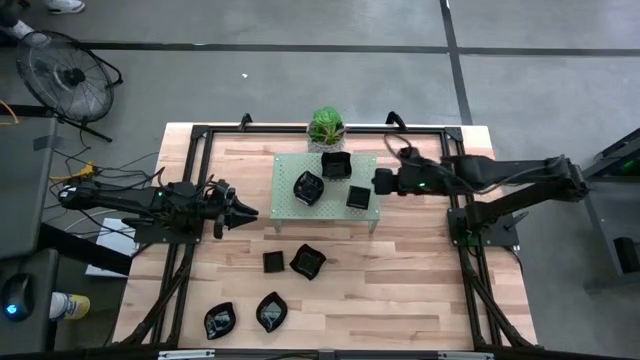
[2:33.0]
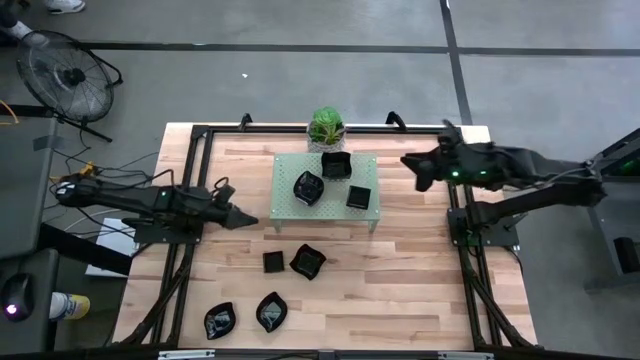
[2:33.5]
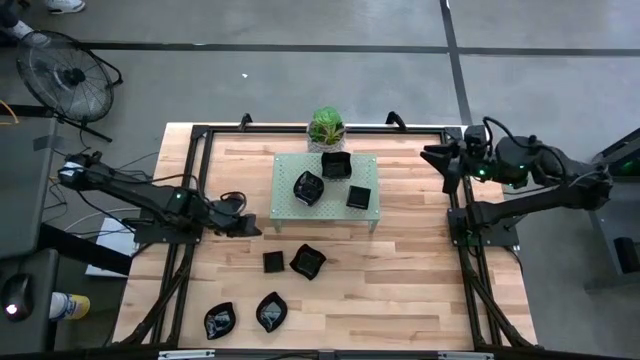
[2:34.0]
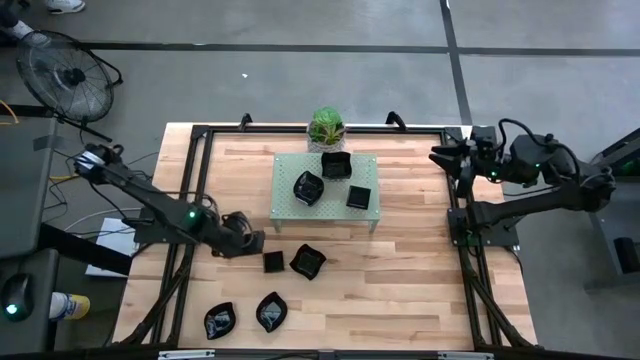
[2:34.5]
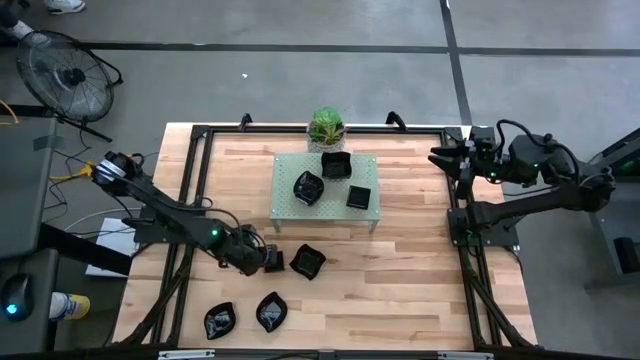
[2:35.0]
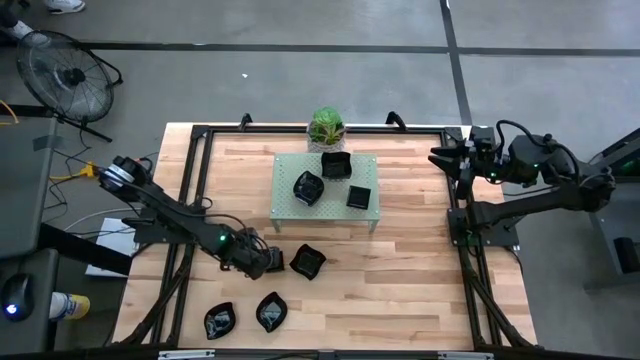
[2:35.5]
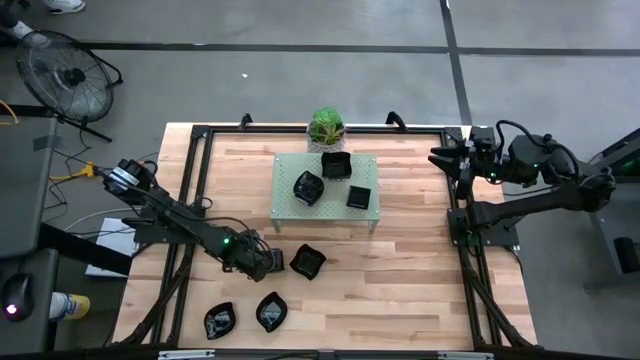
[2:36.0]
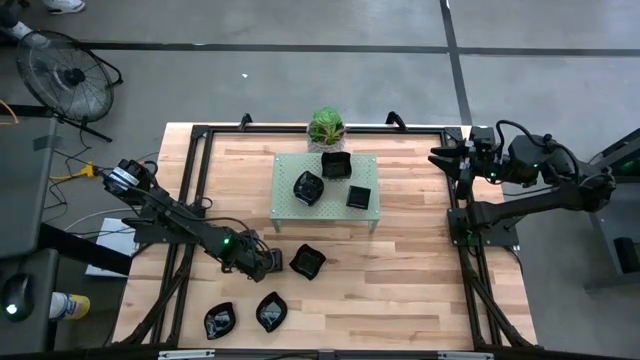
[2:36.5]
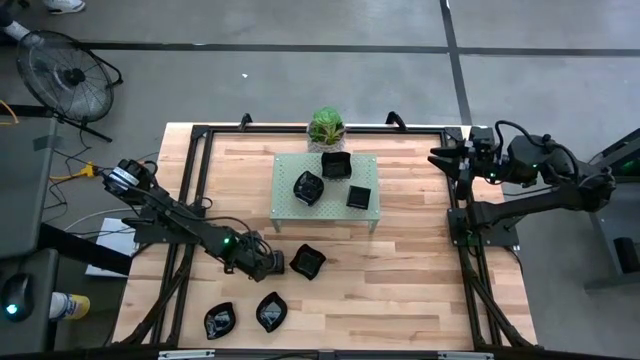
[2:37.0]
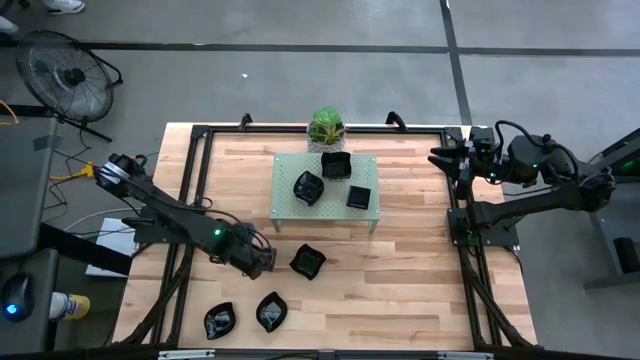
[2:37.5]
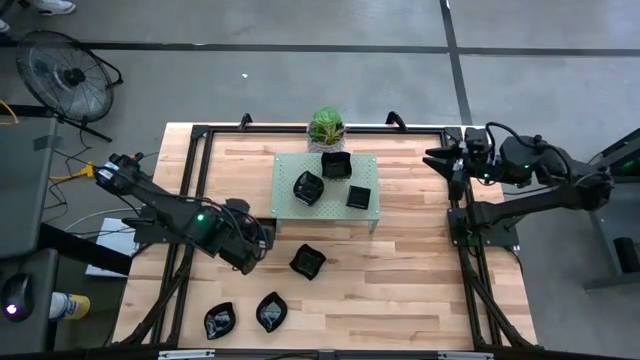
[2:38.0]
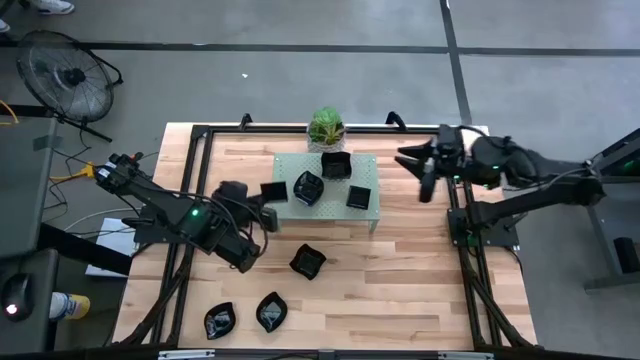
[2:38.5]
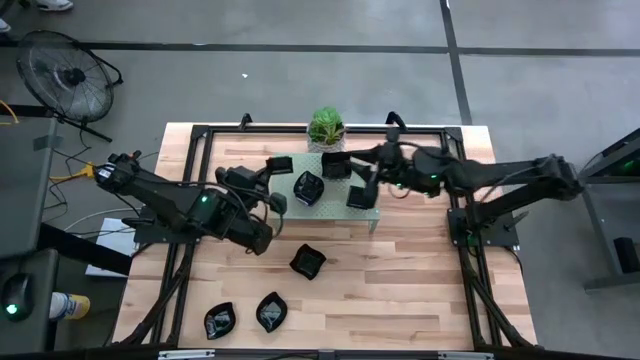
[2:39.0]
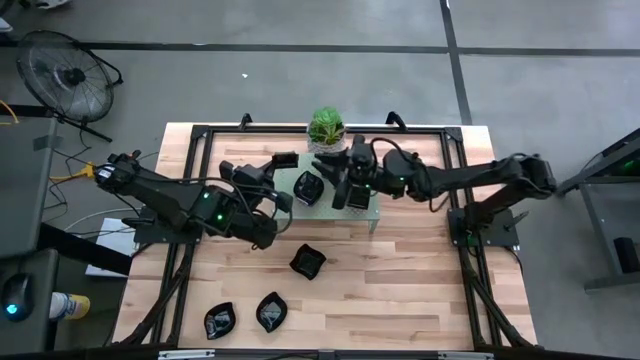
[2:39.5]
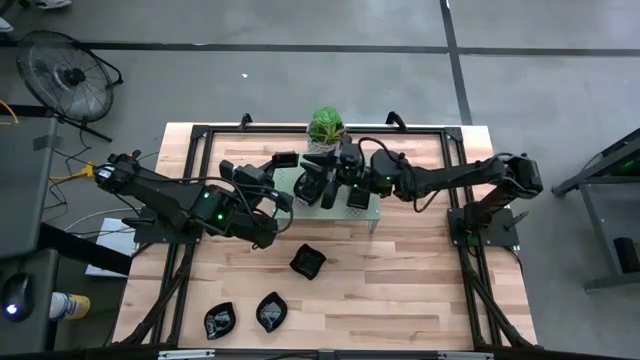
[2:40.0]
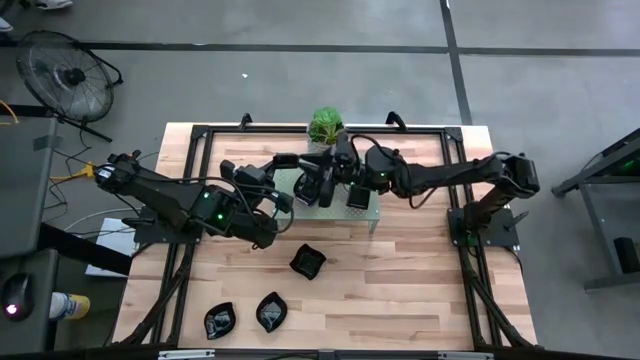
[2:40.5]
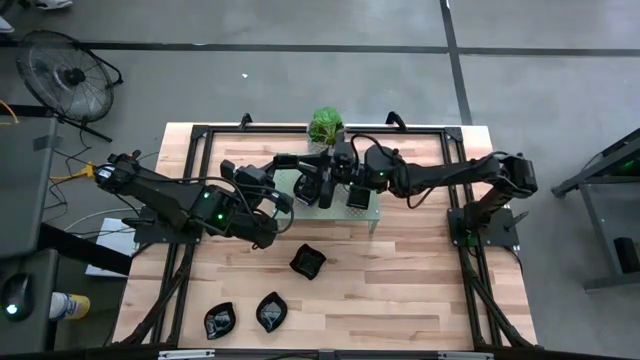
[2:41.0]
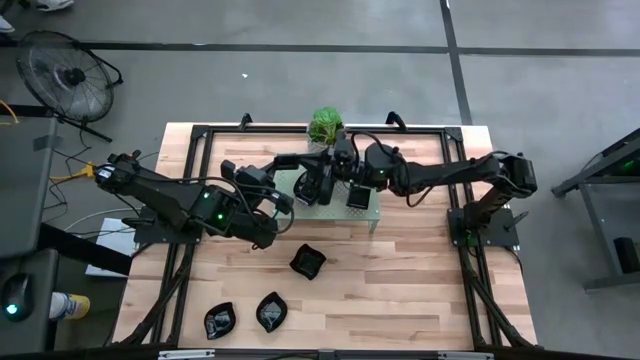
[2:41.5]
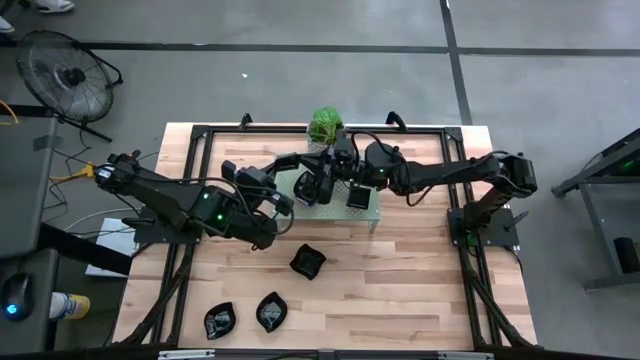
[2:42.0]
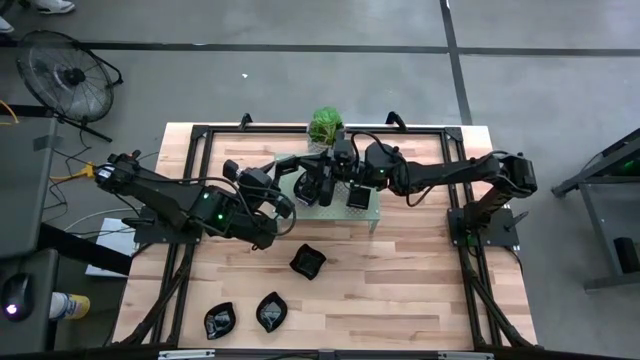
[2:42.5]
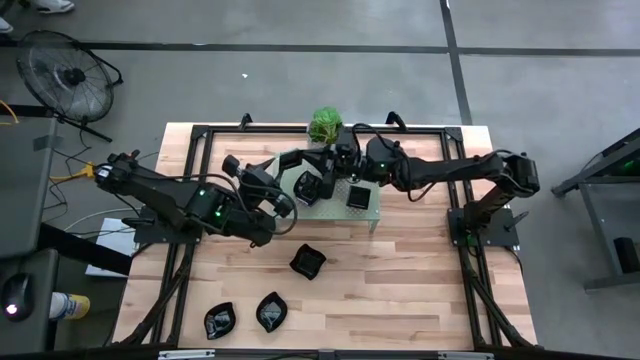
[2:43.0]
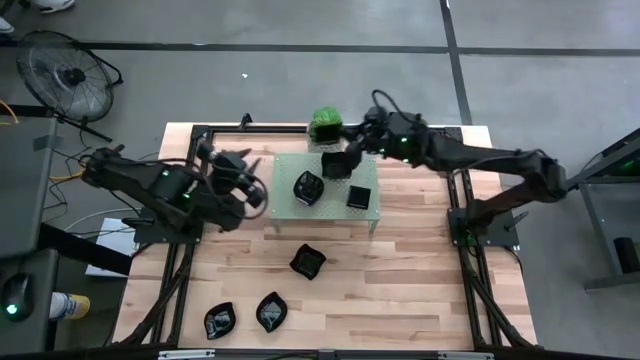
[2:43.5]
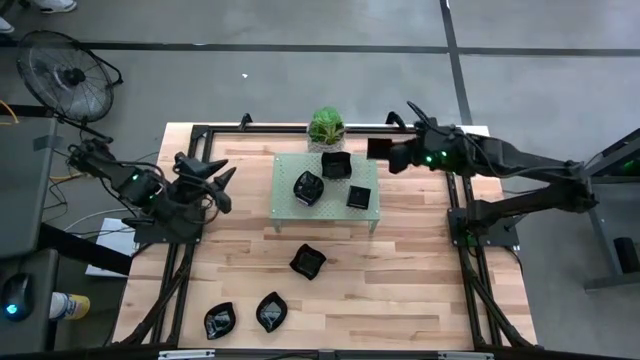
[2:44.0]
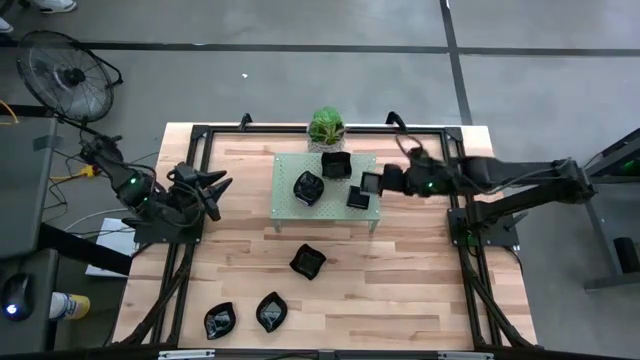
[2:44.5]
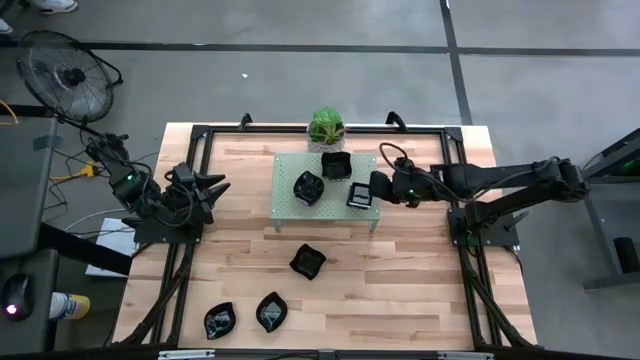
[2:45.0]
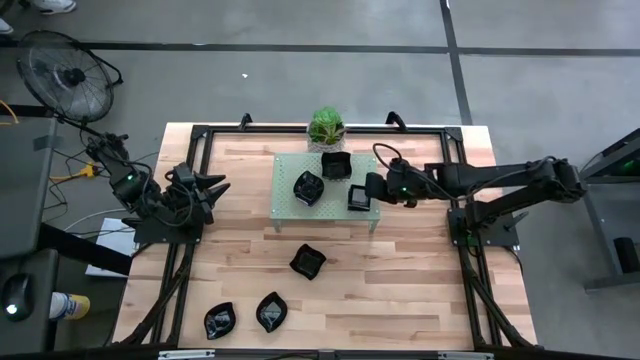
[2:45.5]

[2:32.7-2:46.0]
Task: Pick & Place Mini shaped plates
Stack the black square plate on the other black square plate on the shelf

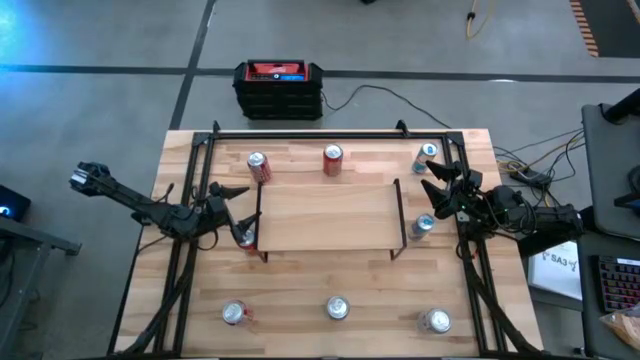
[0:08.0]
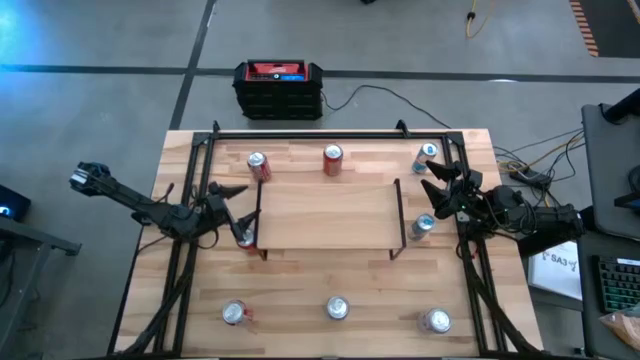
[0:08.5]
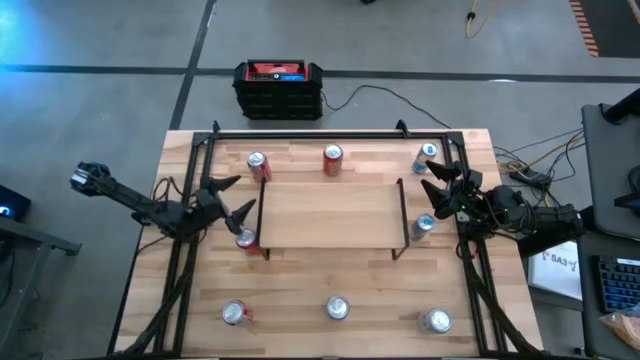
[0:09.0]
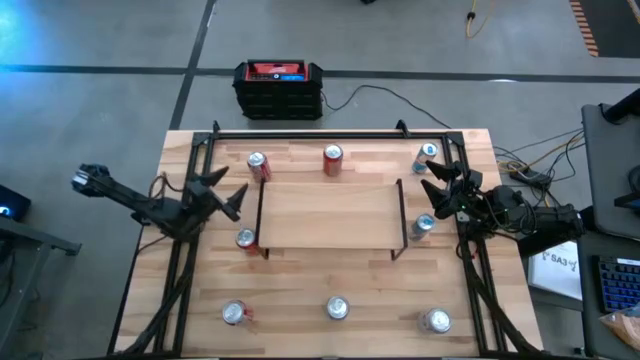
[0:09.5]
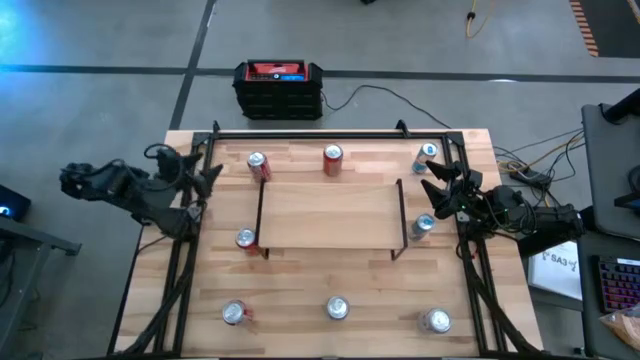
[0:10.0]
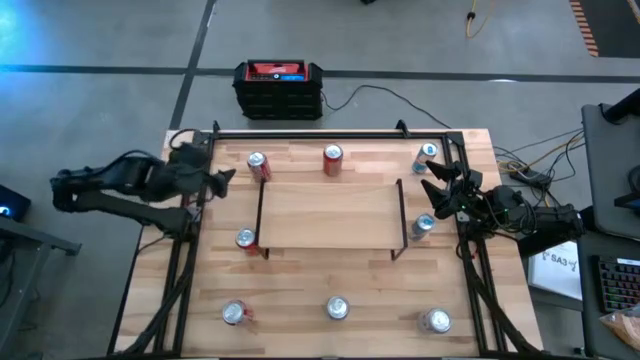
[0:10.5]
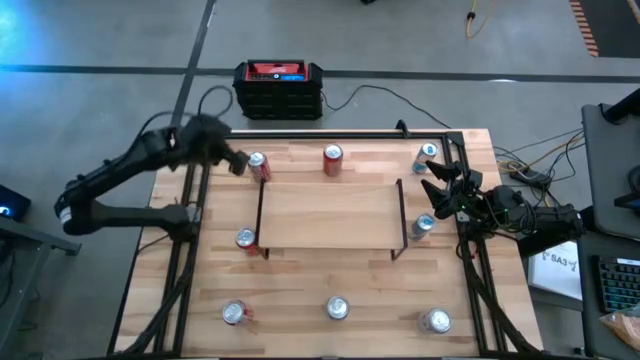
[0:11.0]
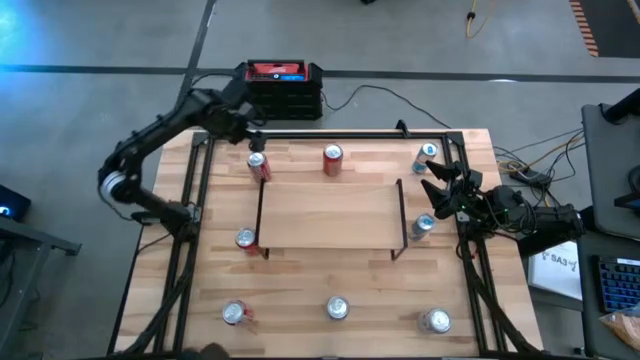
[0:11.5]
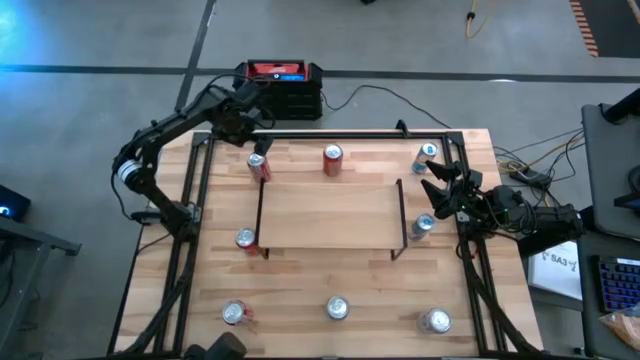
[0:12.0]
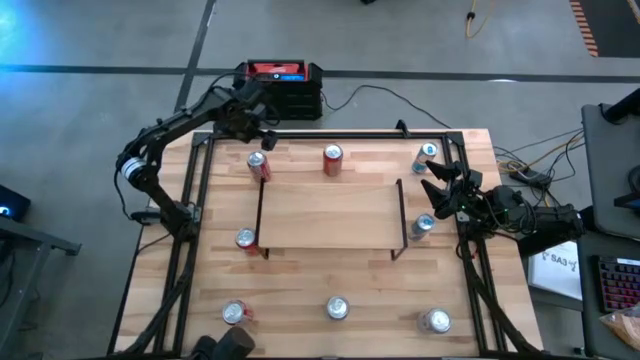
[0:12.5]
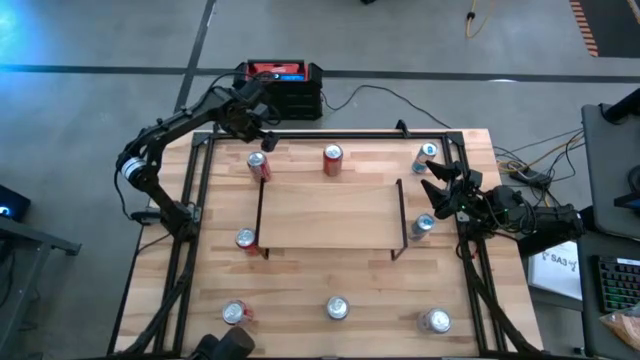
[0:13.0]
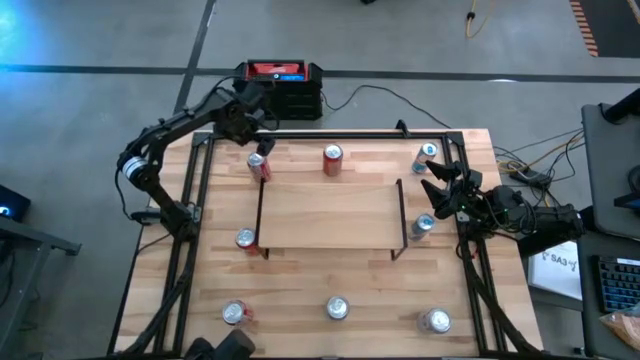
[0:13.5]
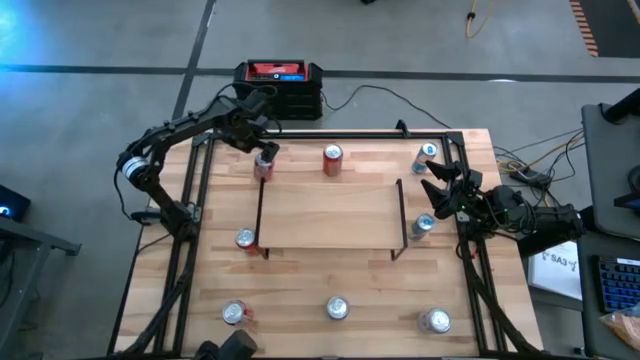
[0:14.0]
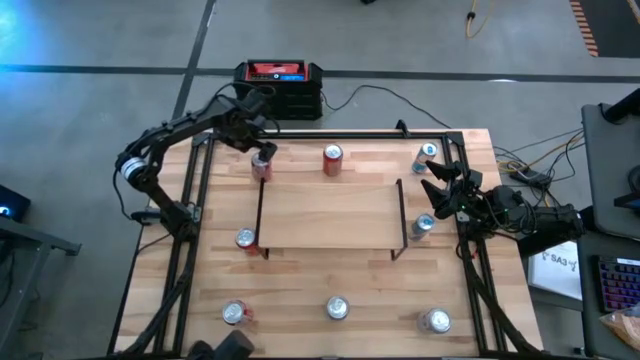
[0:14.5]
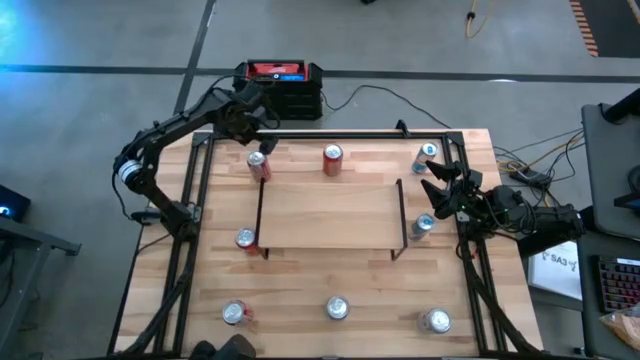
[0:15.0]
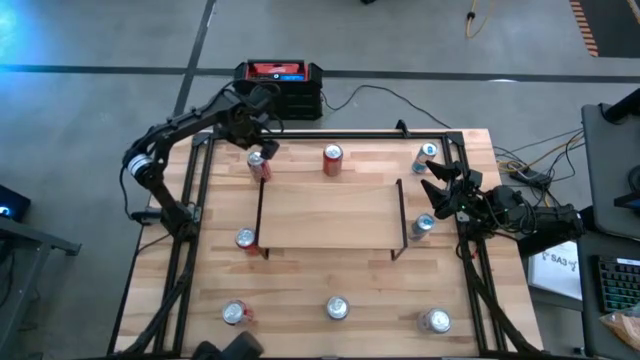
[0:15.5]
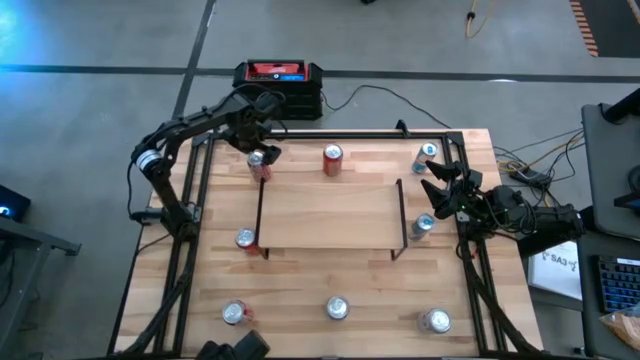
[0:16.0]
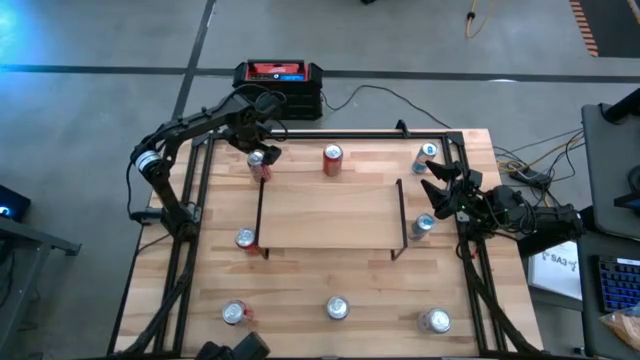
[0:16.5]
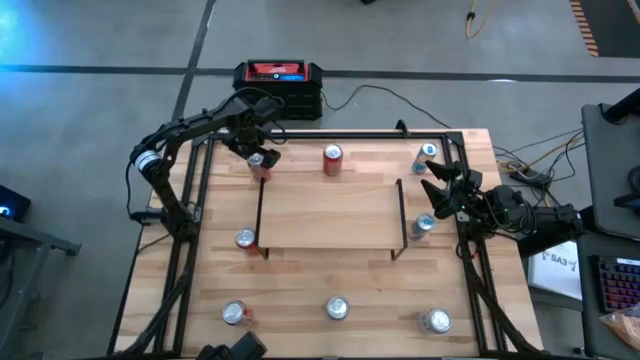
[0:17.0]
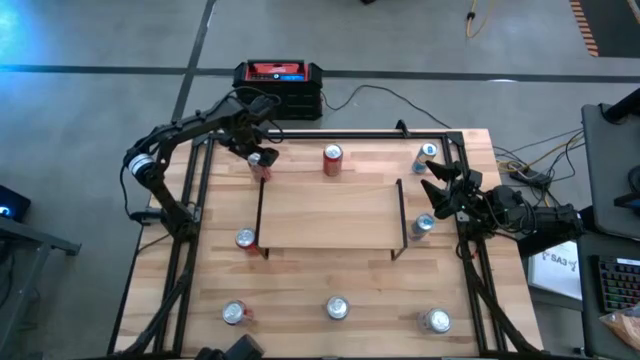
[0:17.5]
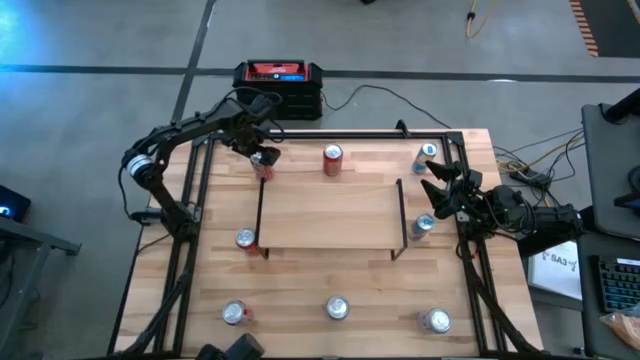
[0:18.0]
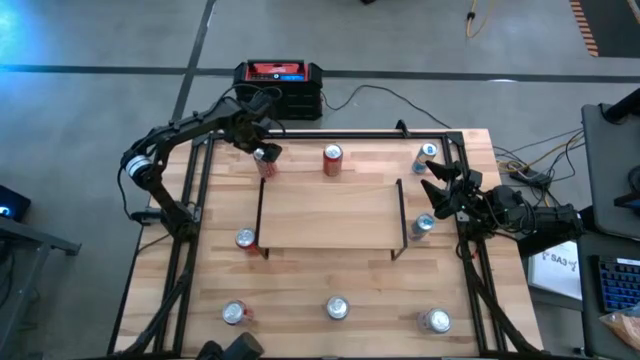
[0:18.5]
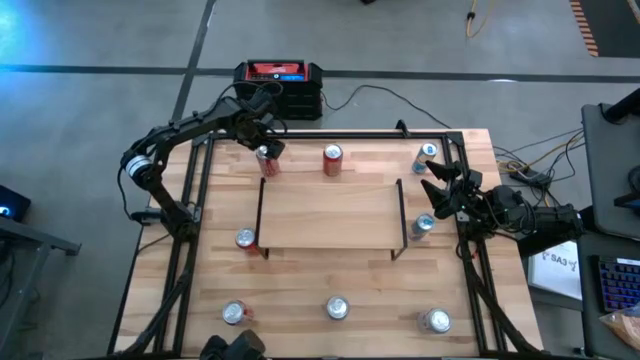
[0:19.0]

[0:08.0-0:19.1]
Task: Place canned beverage on shelf
Move the top red white soda to the middle left of the table
